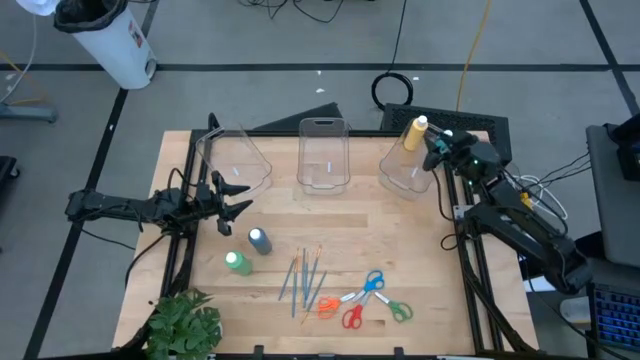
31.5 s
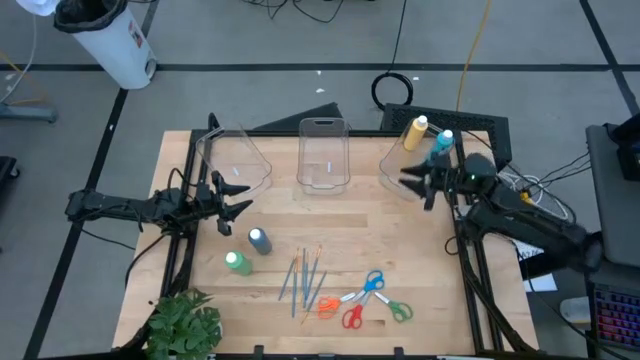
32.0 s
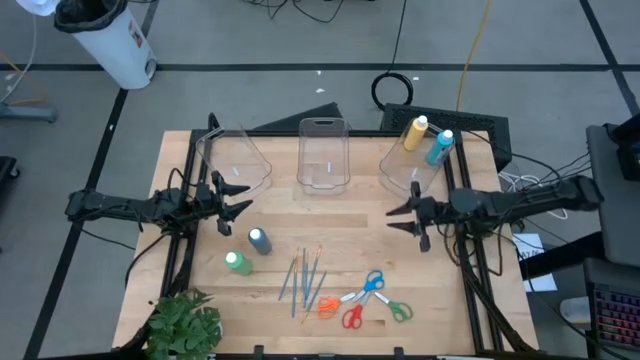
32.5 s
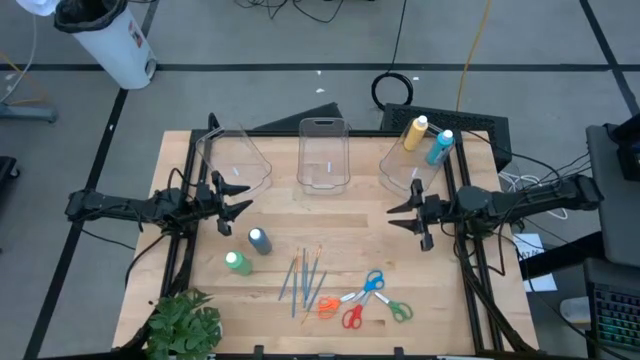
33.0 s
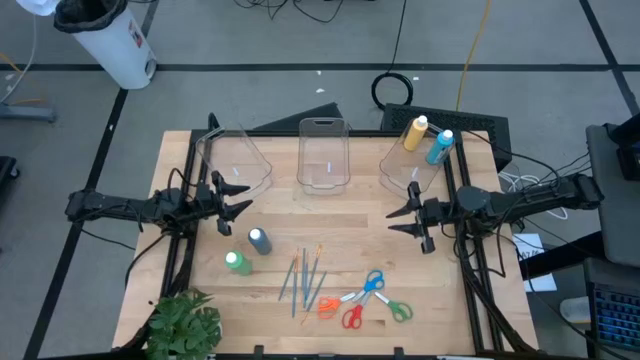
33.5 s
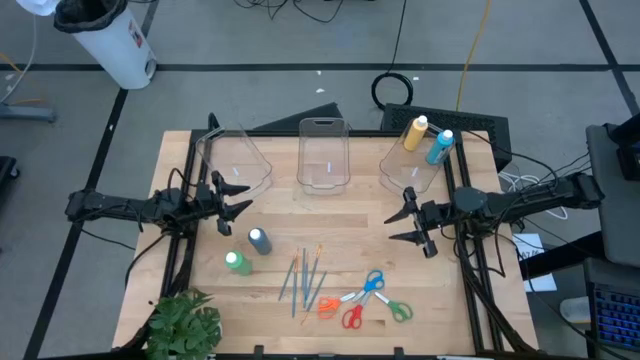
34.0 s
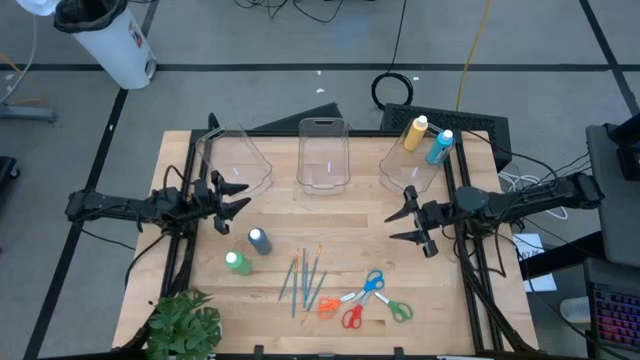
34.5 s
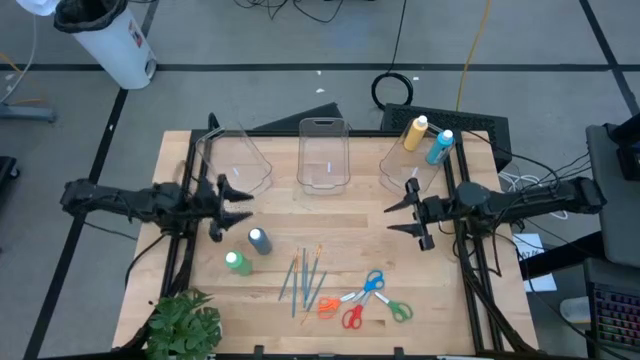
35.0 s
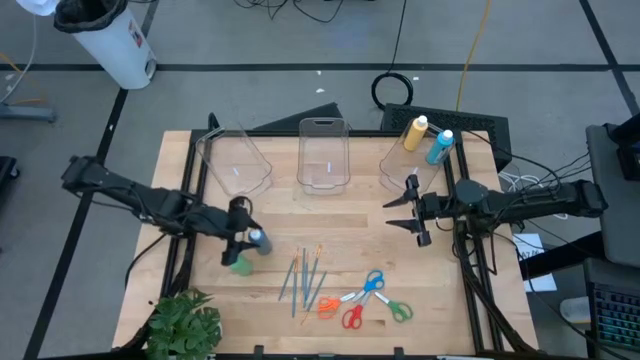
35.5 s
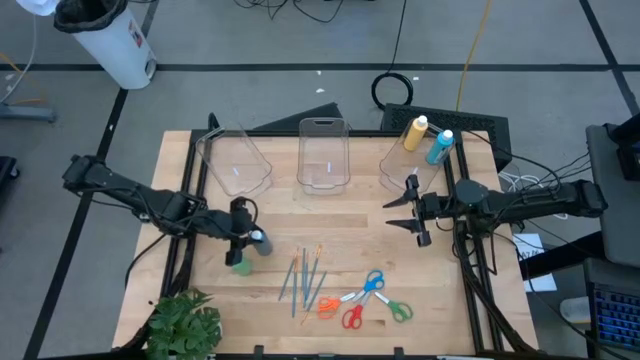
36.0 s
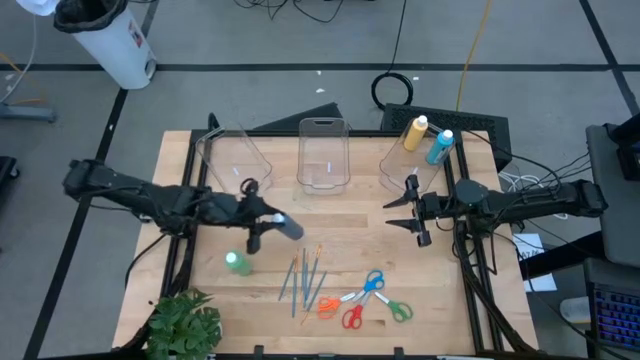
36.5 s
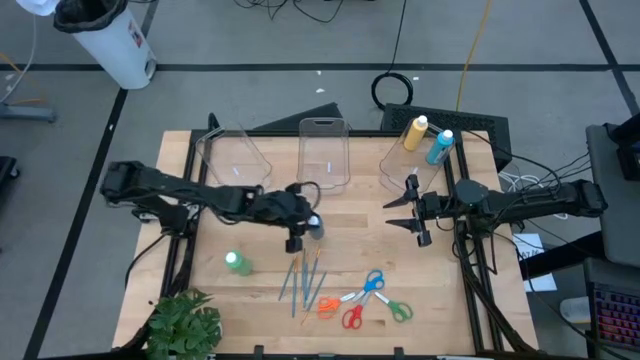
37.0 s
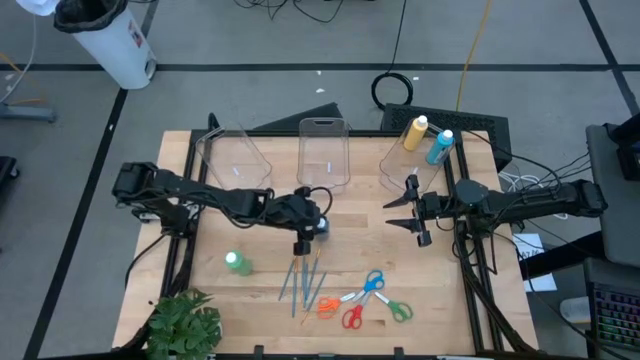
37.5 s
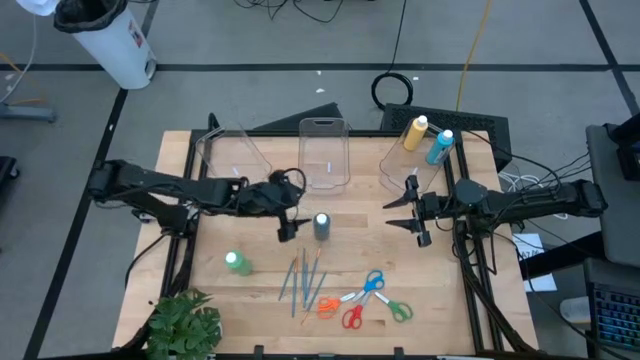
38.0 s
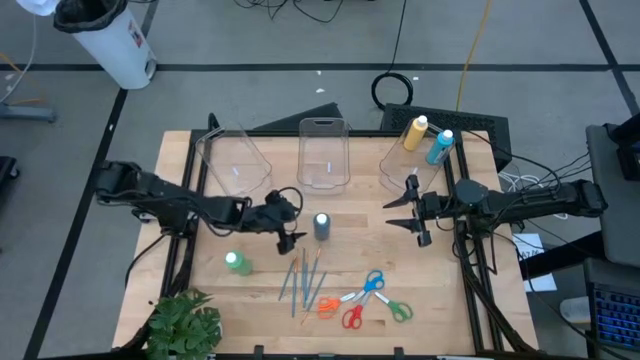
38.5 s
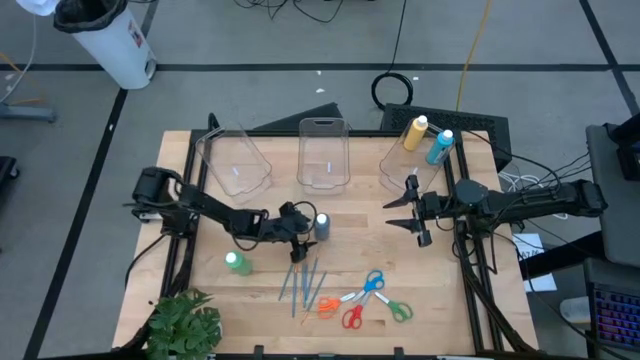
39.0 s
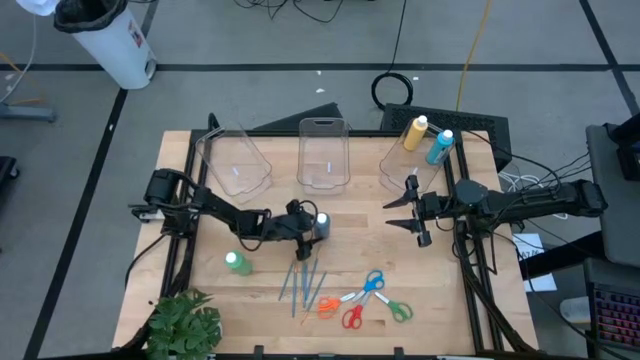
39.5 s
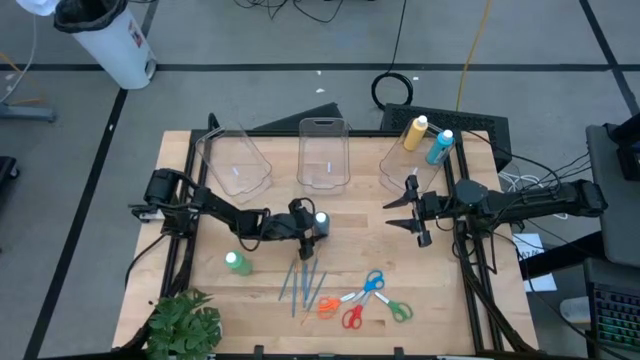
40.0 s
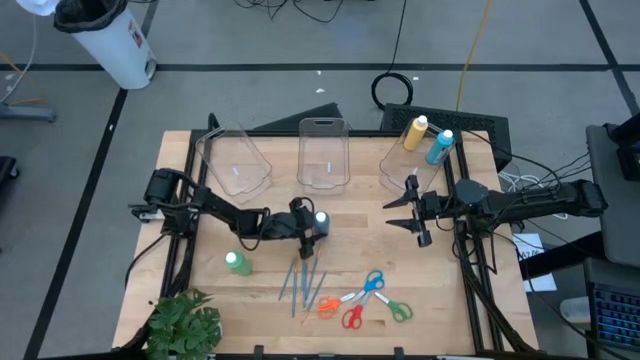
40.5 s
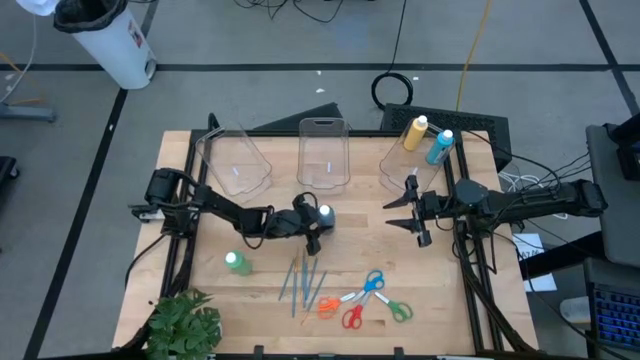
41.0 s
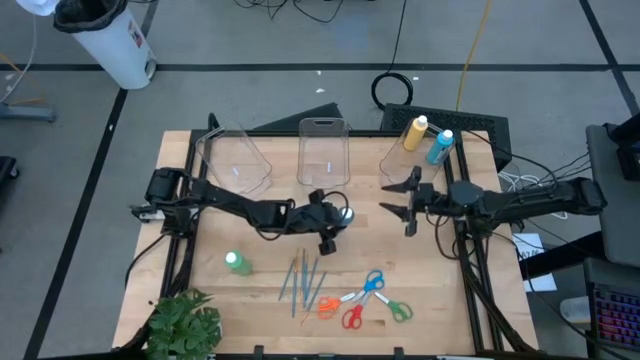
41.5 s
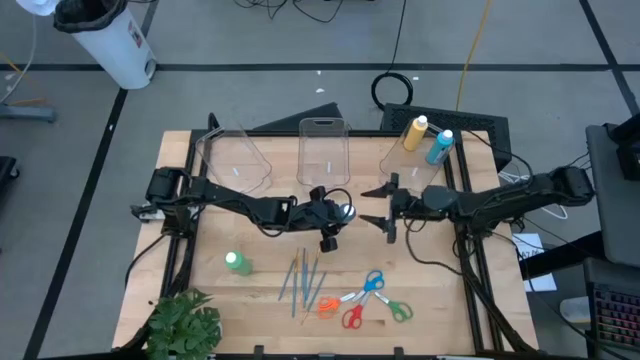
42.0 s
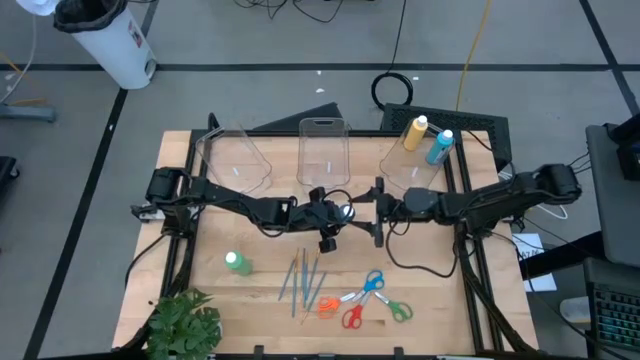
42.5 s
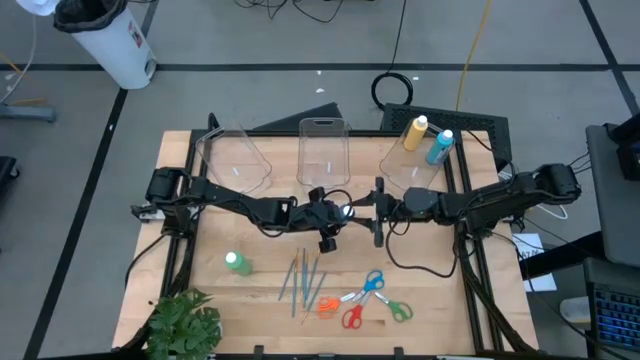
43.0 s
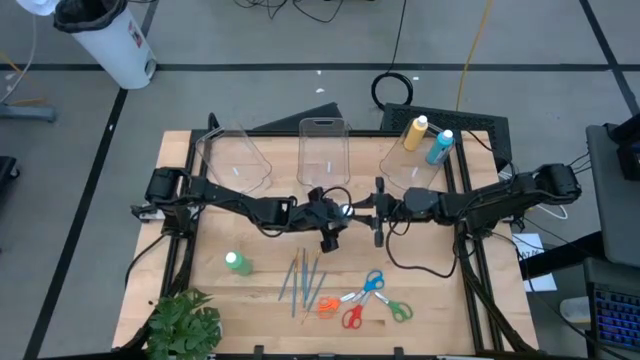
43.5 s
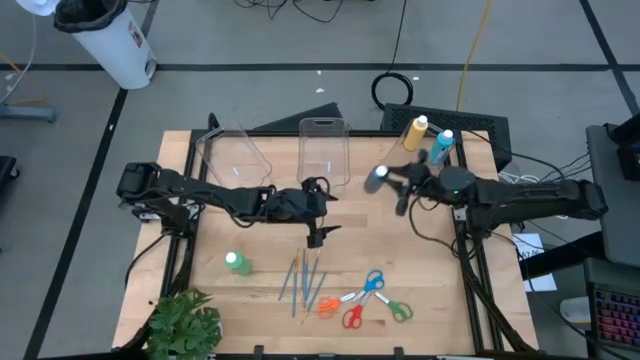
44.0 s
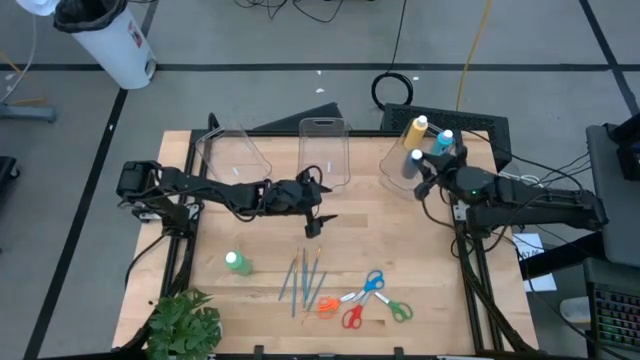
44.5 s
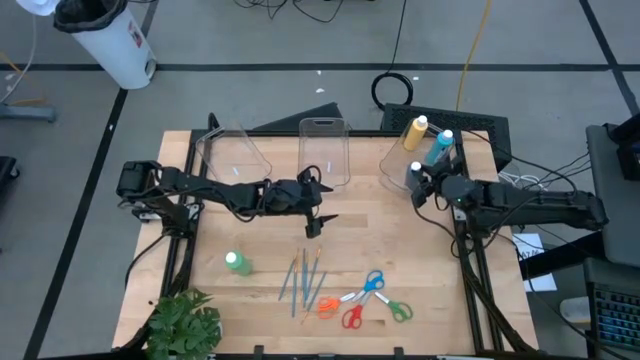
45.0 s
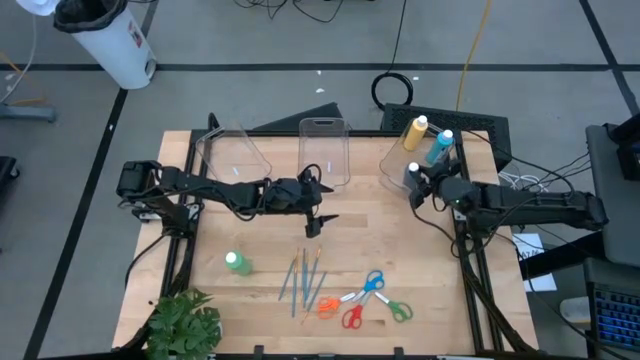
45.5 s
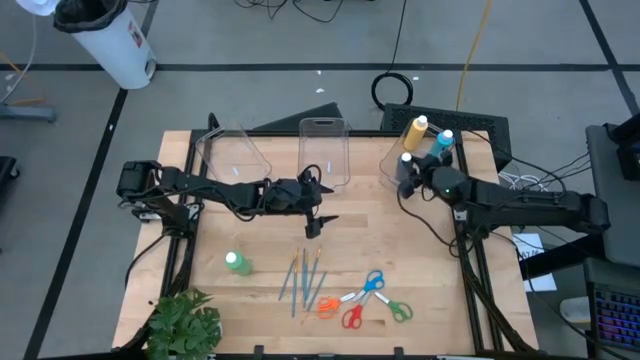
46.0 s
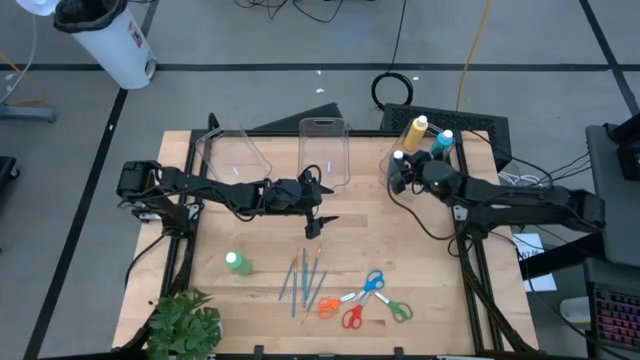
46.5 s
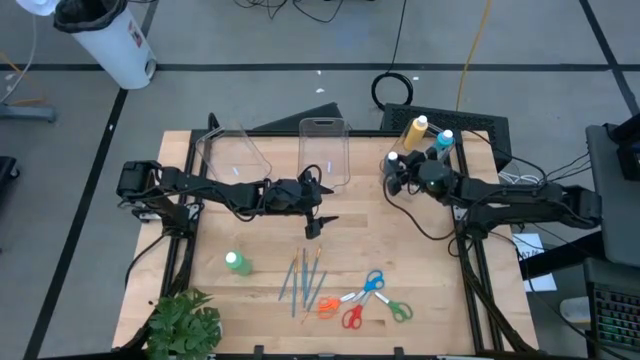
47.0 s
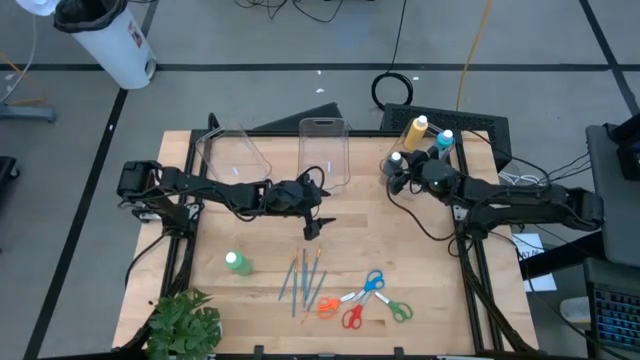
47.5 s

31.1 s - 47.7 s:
Task: Pick & Place Paint Supplies
Put the blue paint bottle into the right transparent bin

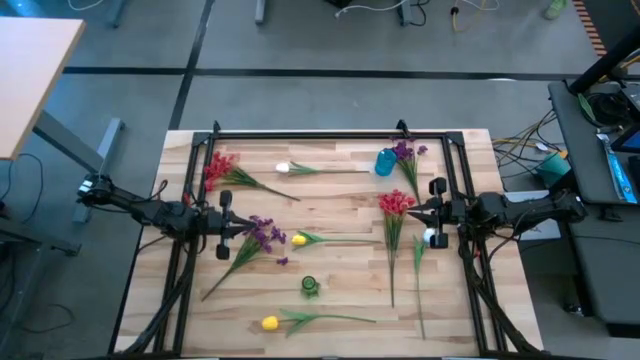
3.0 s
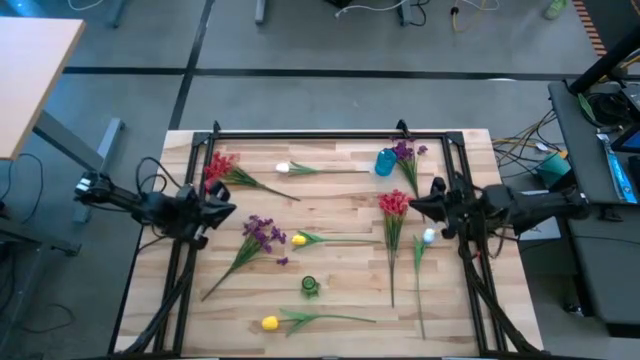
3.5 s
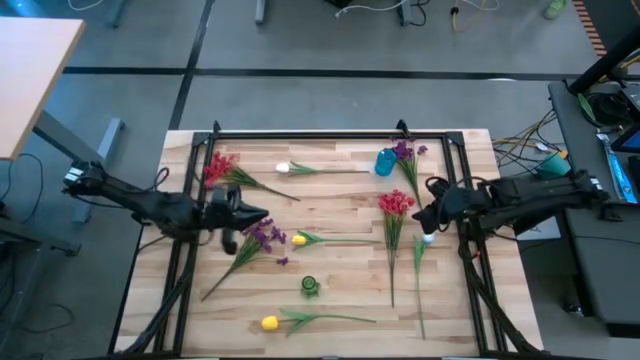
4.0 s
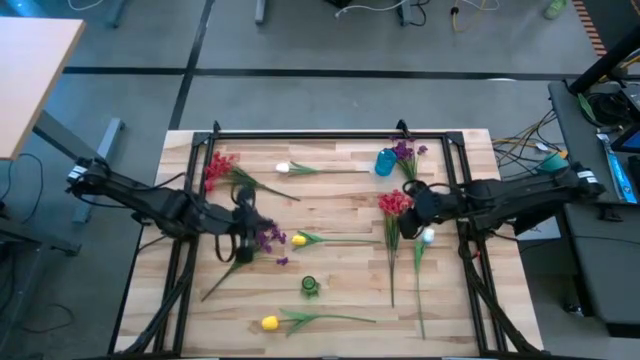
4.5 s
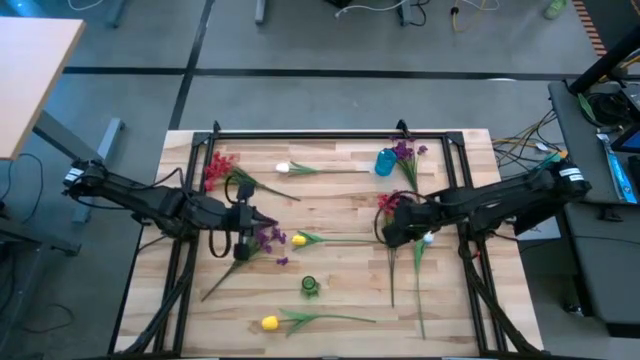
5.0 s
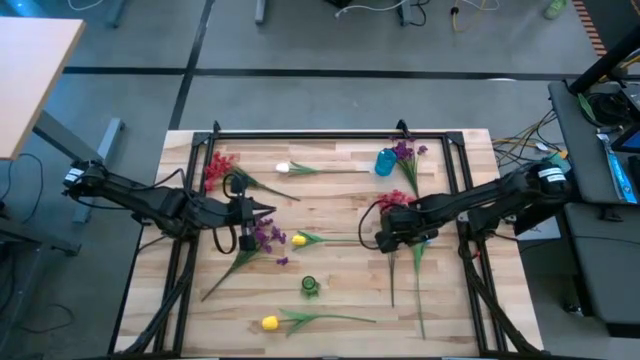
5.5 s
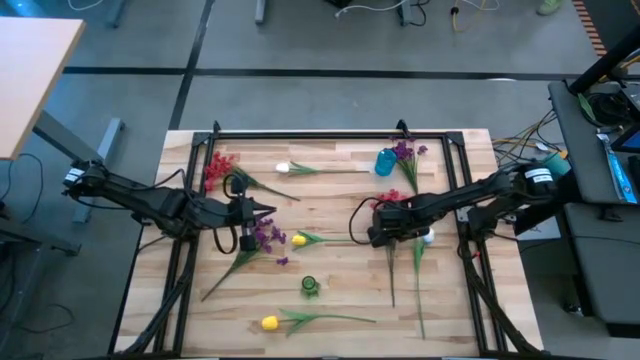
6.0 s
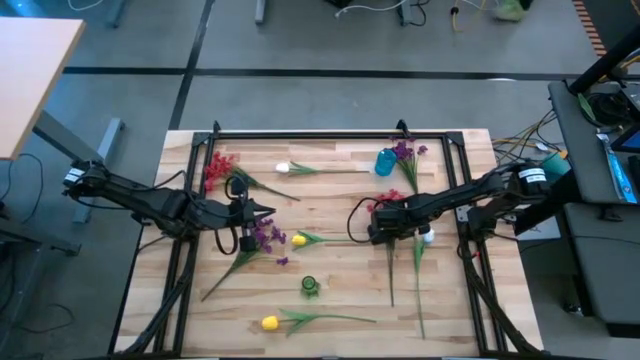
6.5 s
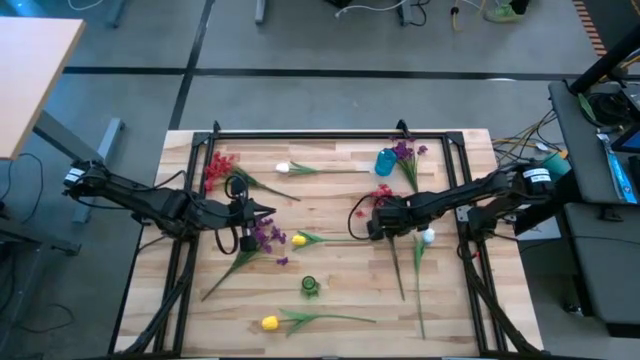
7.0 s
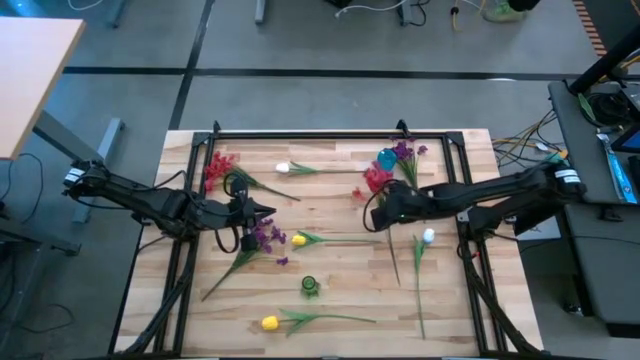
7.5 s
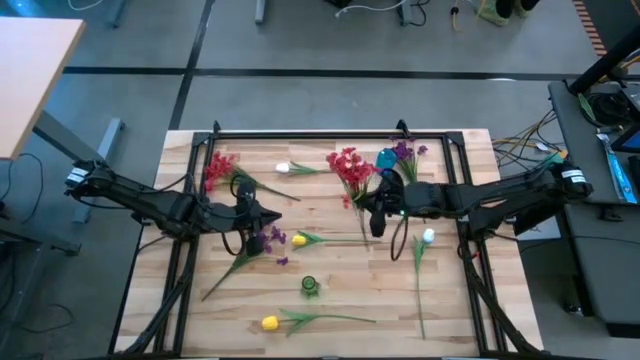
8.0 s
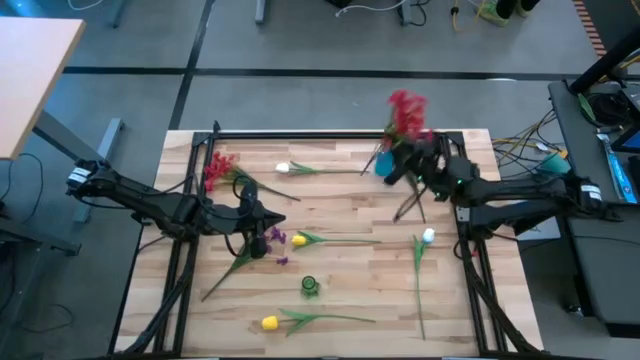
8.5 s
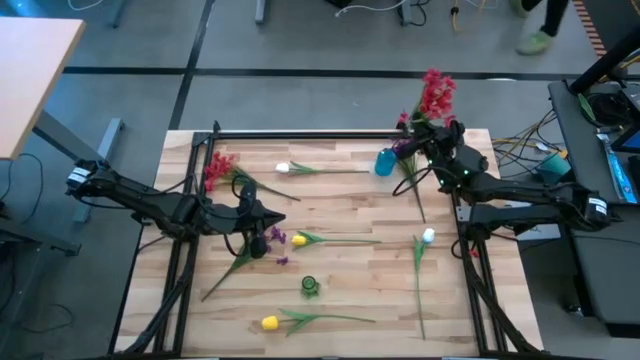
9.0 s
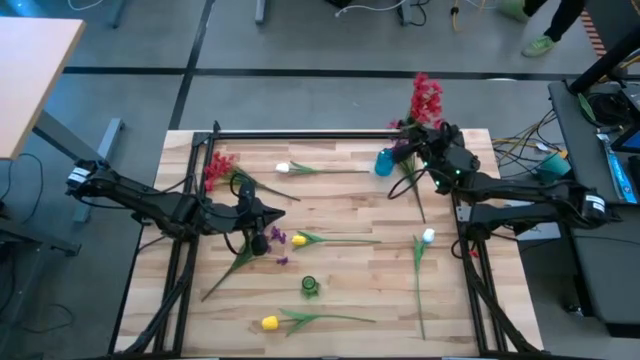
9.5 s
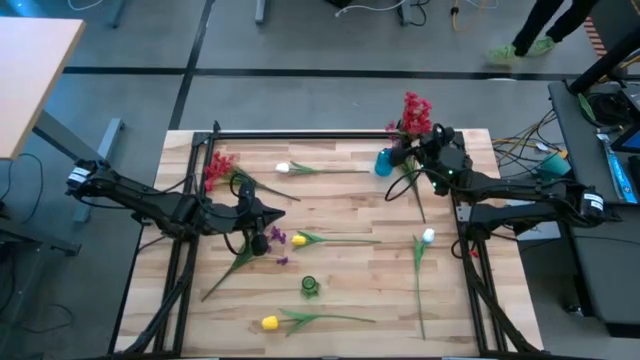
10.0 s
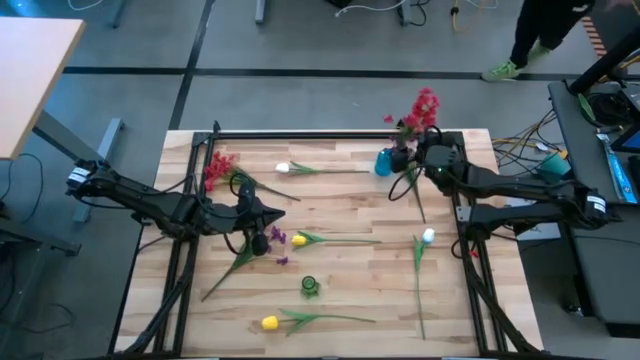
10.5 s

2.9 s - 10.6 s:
Task: Sort flowers into vase by color
Put the right red flowers into the blue vase
